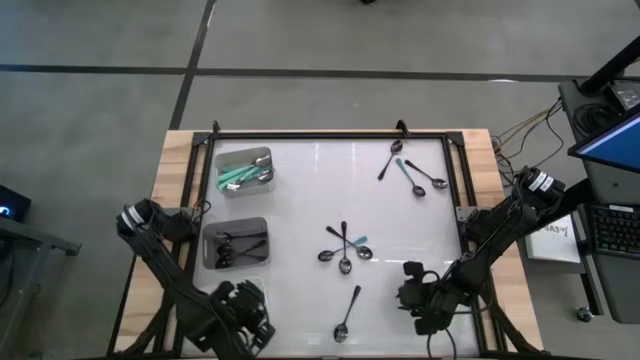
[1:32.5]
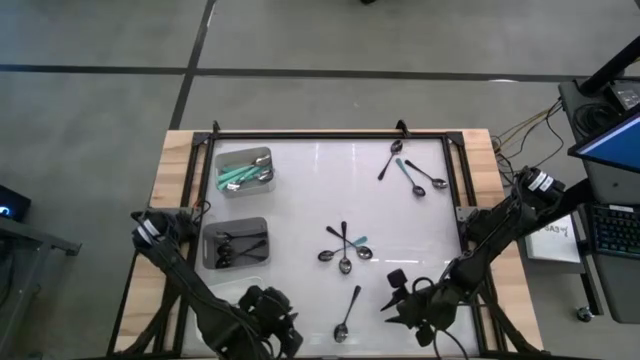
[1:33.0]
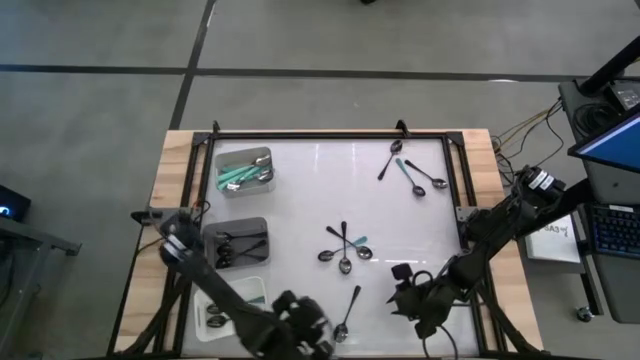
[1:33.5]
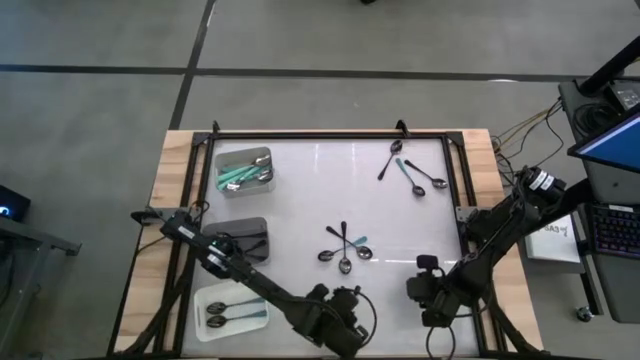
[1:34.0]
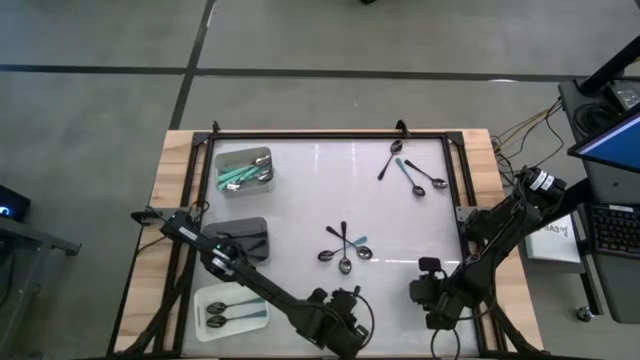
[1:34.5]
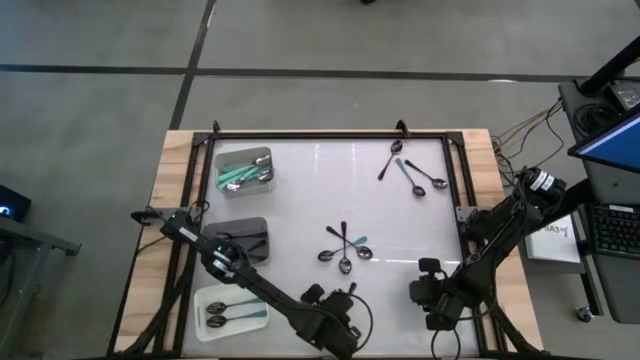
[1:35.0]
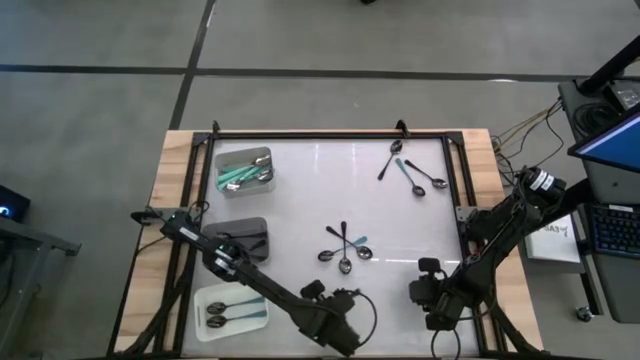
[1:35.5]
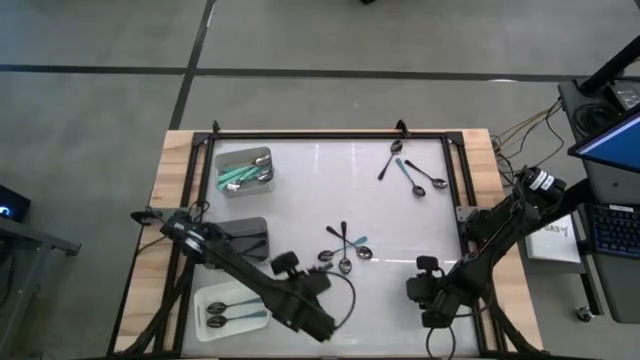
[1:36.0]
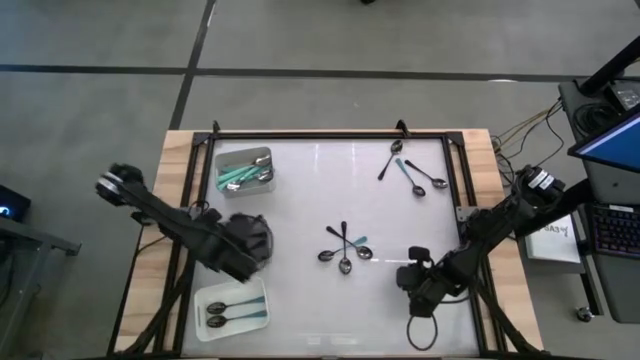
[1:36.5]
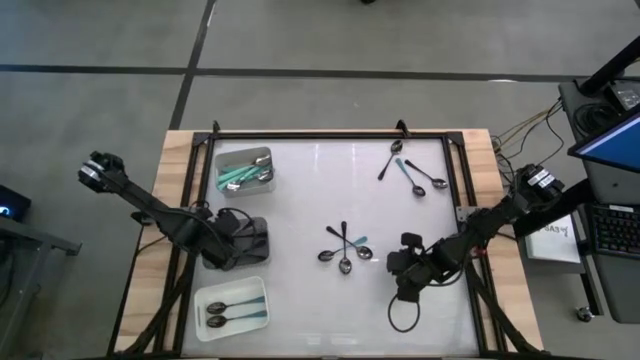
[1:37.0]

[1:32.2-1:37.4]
Task: Sort silverware by color (type)
Put the black spoon into the black bin

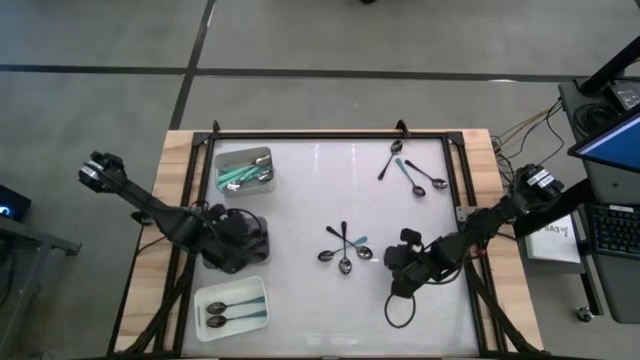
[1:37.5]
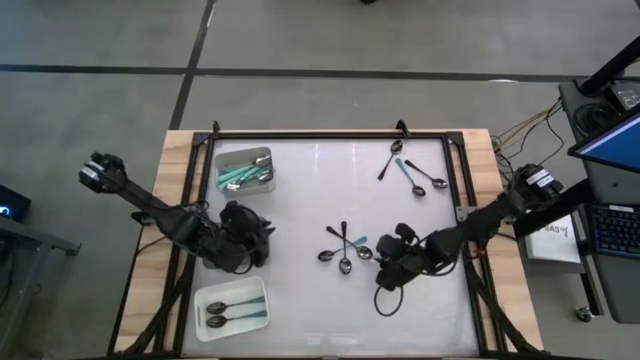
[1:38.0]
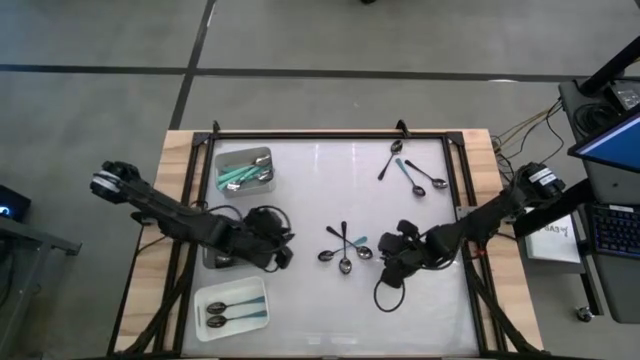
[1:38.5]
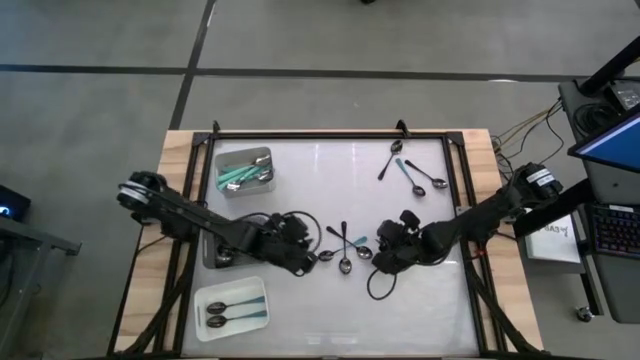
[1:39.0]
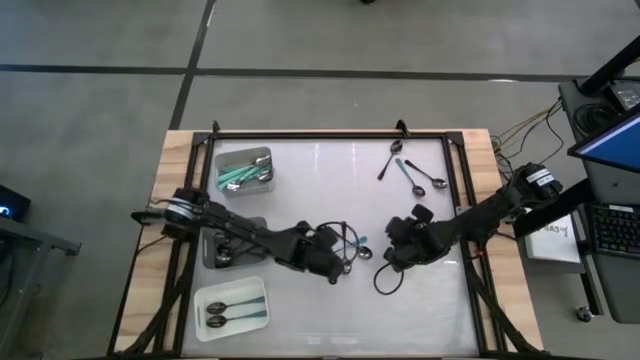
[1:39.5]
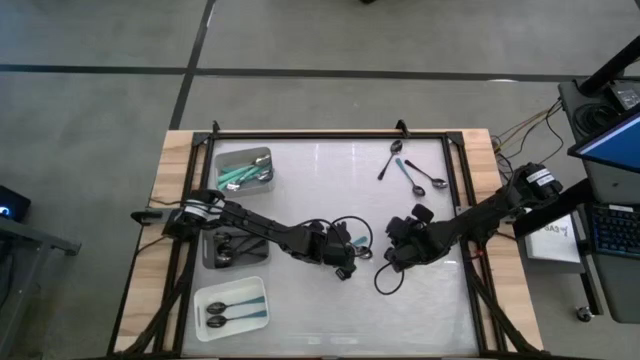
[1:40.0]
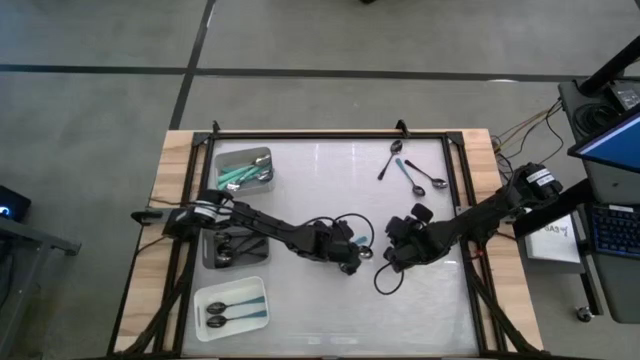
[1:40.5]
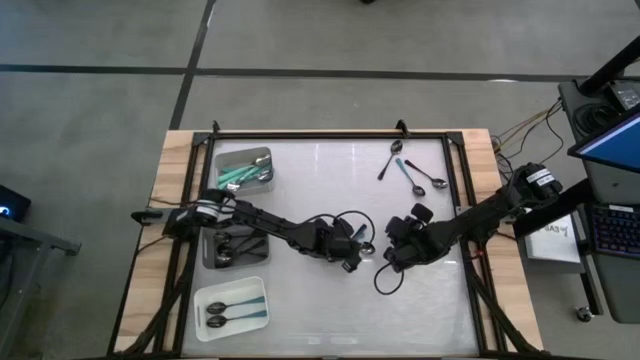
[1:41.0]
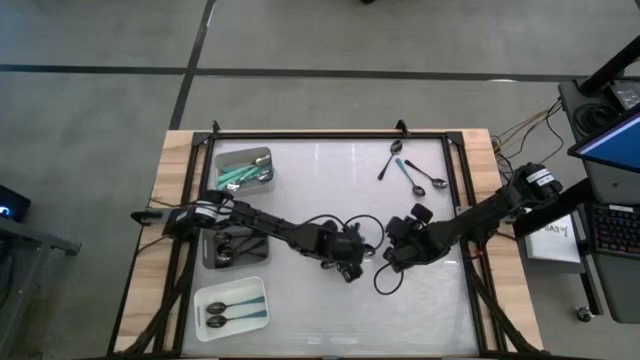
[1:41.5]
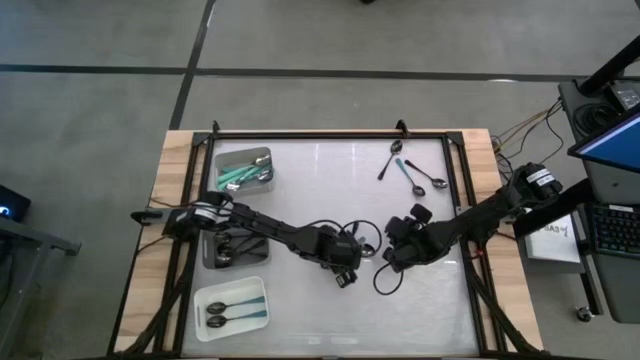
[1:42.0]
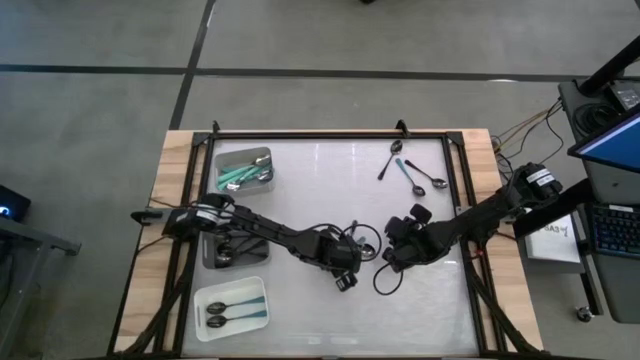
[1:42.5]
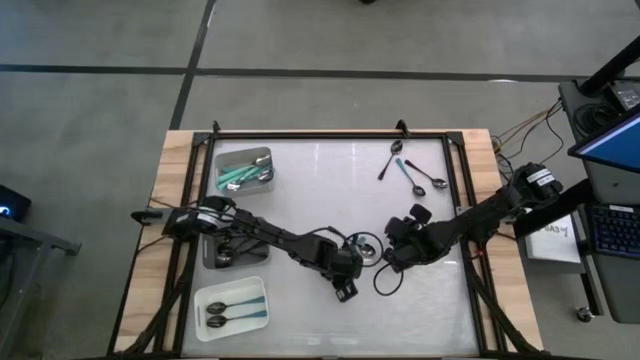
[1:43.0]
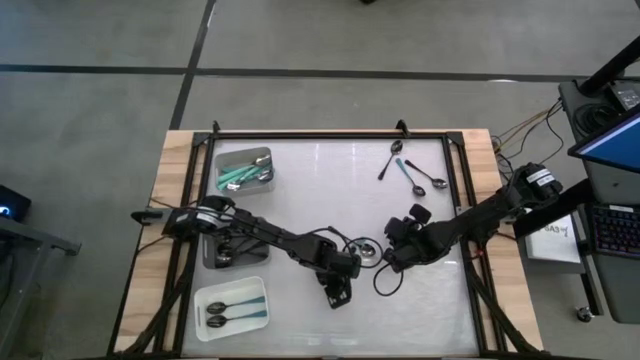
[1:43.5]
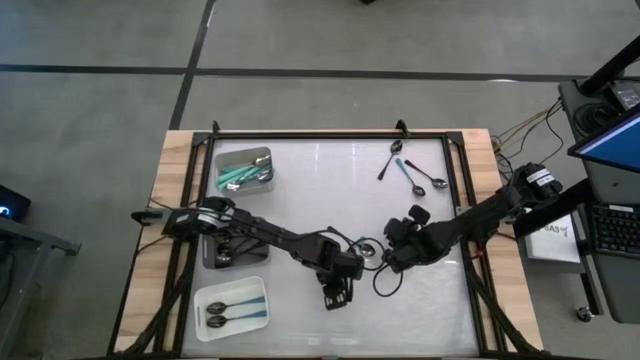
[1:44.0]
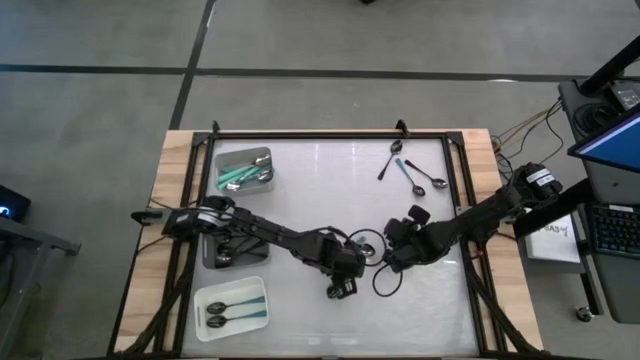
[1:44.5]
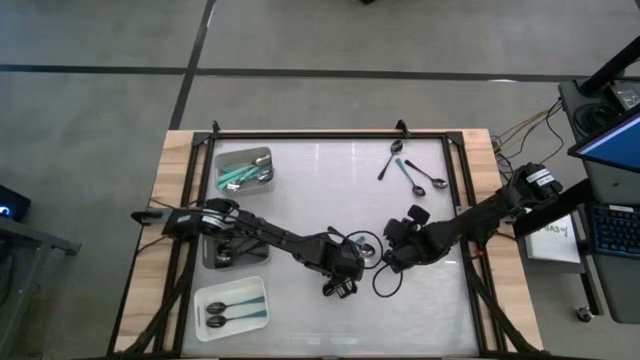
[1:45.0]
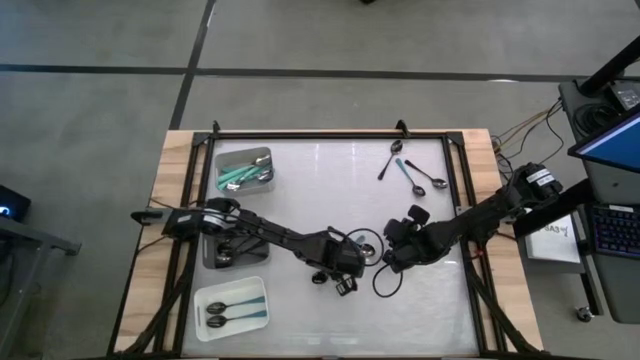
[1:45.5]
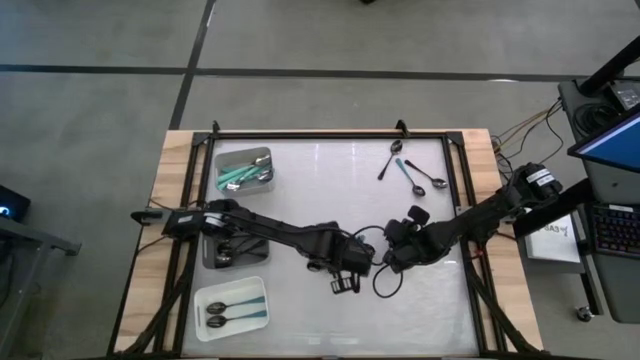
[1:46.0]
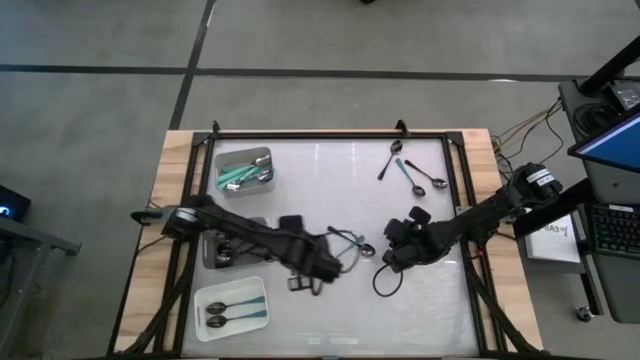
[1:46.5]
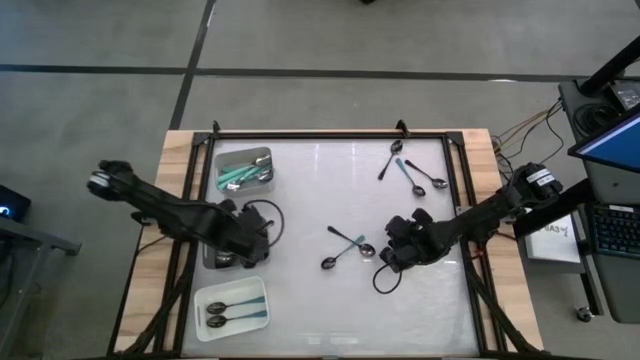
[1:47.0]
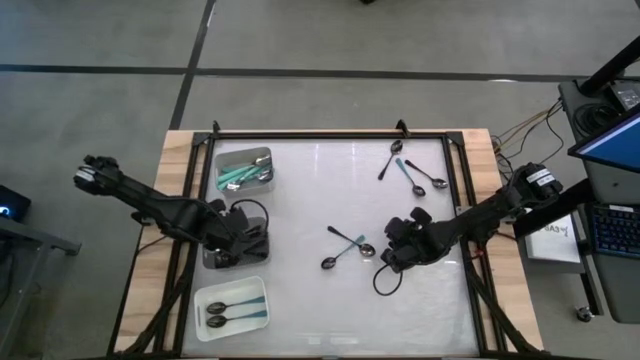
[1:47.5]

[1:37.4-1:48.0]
Put the black spoon into the black bin

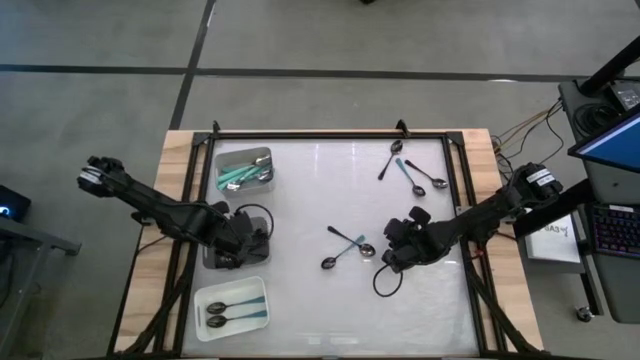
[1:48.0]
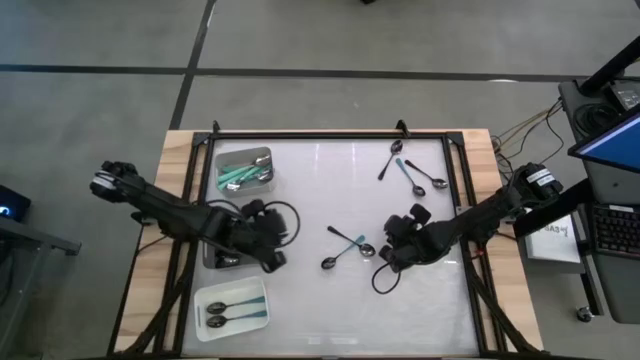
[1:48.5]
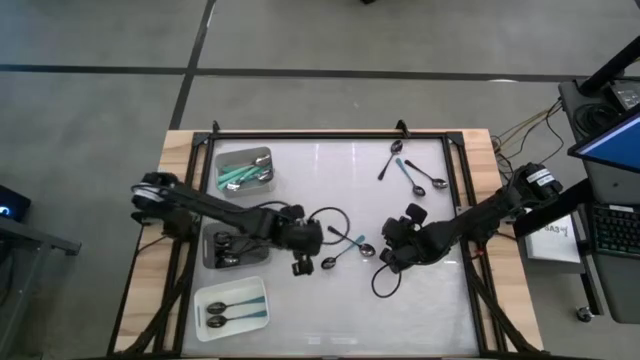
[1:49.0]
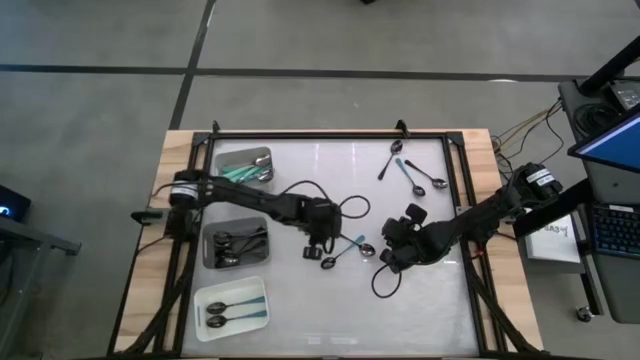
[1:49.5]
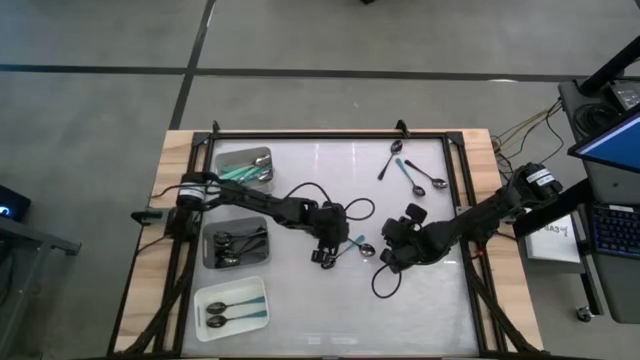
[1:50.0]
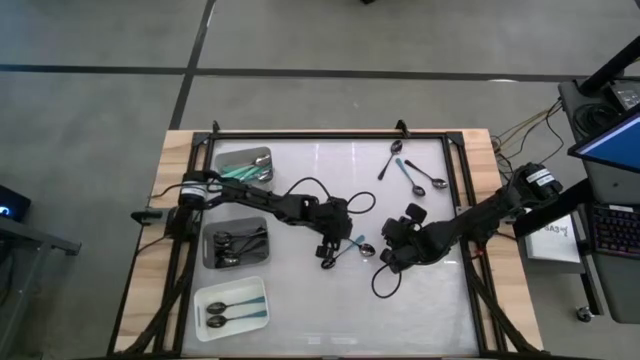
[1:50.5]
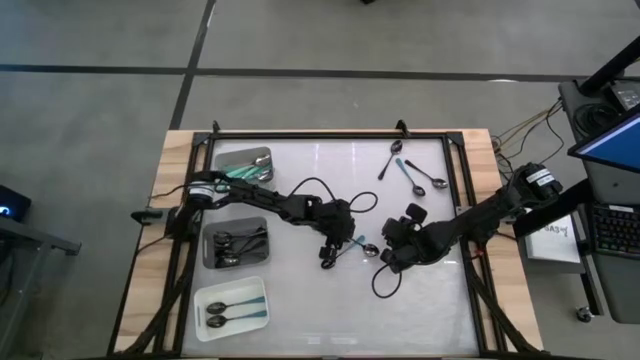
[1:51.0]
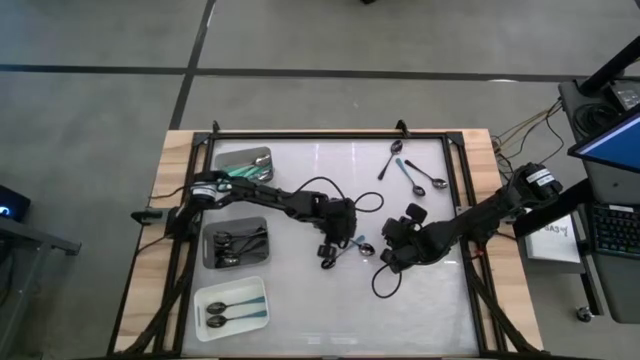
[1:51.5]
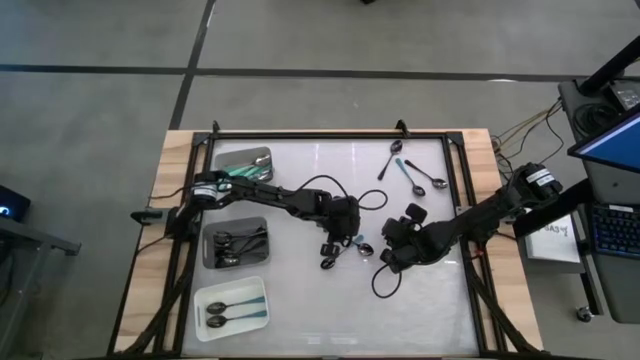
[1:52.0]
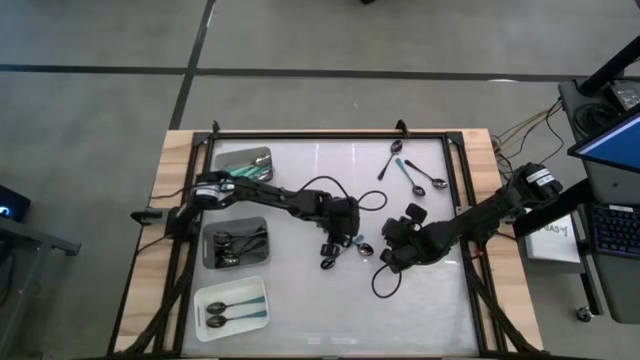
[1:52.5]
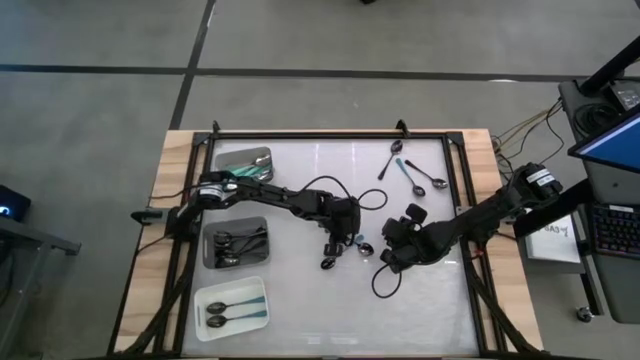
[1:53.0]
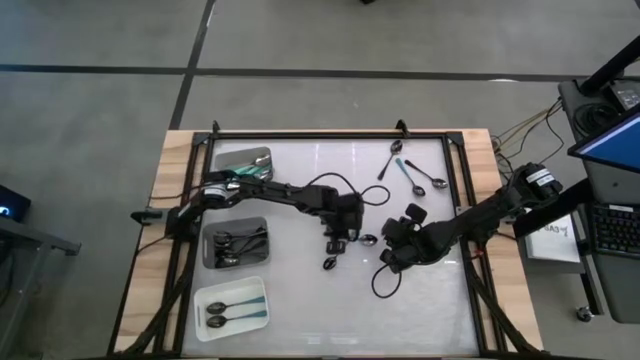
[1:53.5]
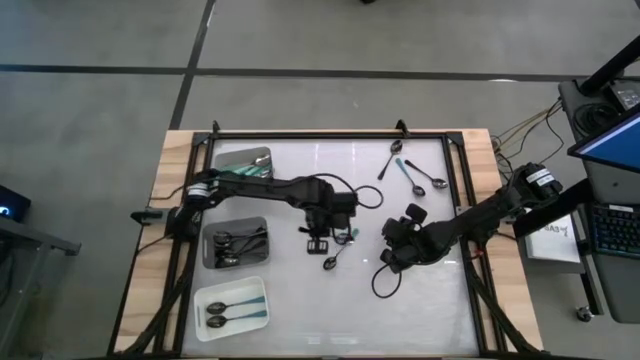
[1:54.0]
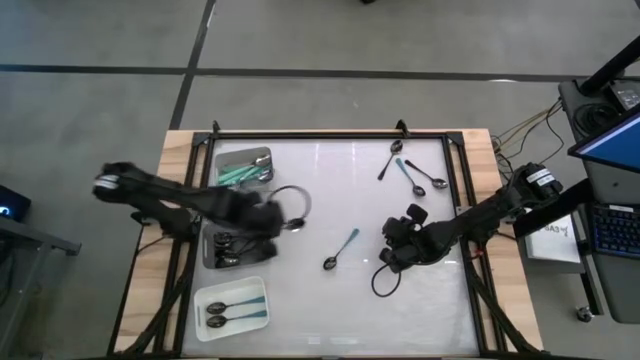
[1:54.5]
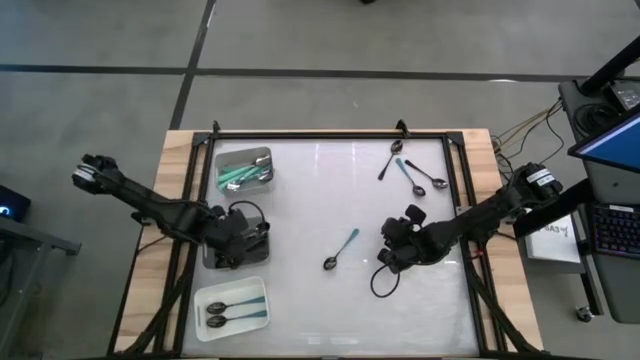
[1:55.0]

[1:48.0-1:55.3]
Put the black spoon into the black bin
